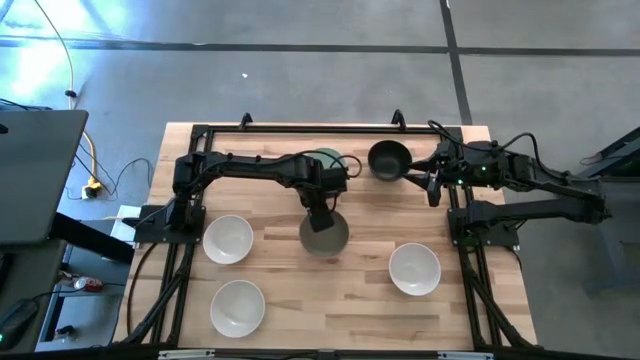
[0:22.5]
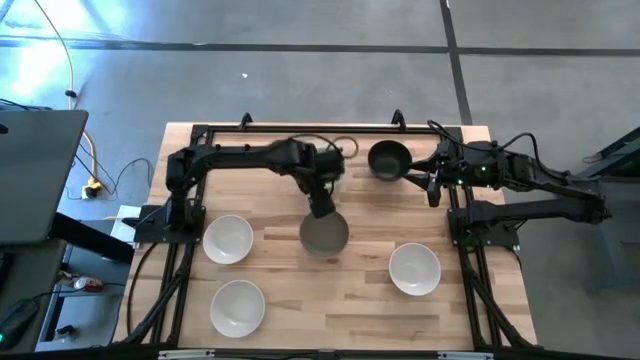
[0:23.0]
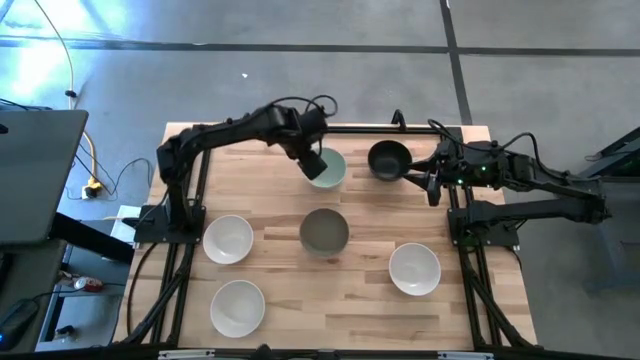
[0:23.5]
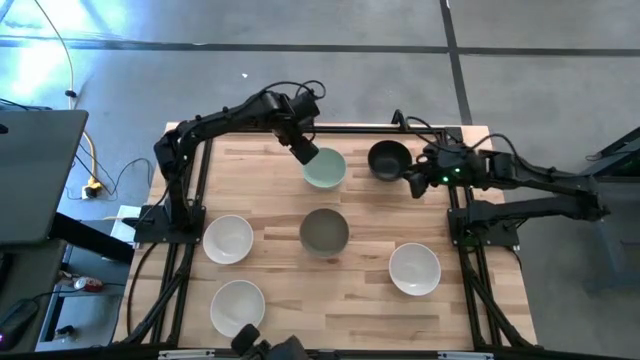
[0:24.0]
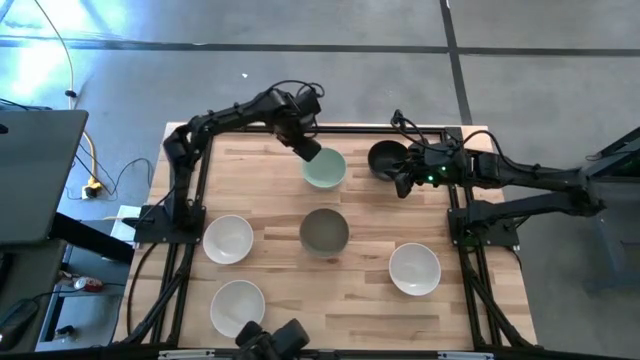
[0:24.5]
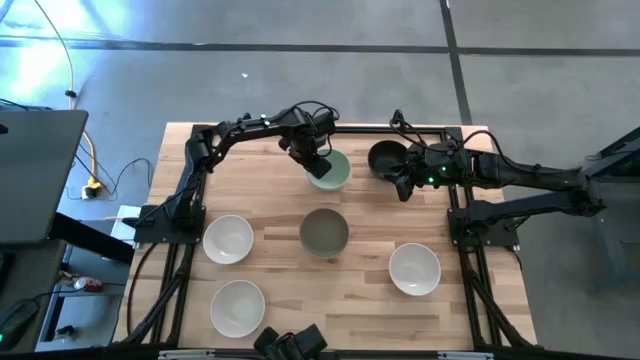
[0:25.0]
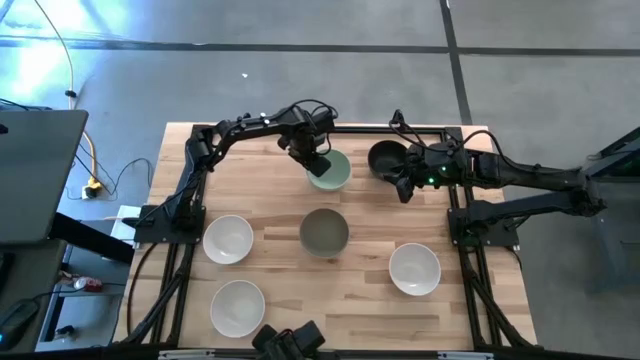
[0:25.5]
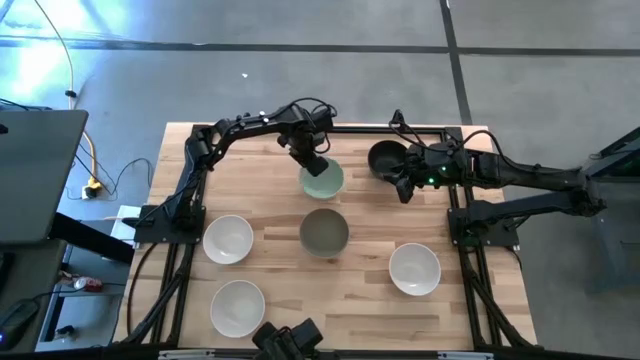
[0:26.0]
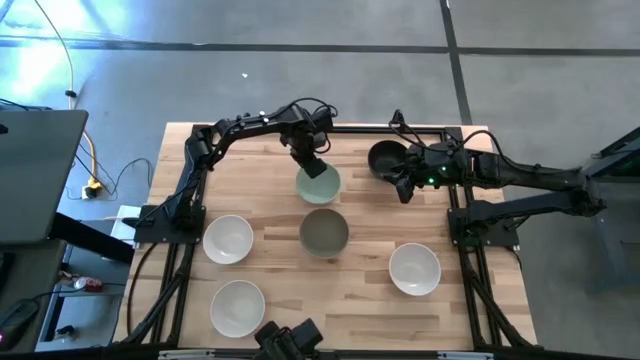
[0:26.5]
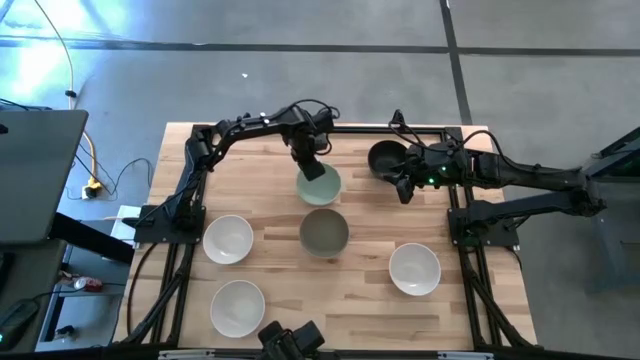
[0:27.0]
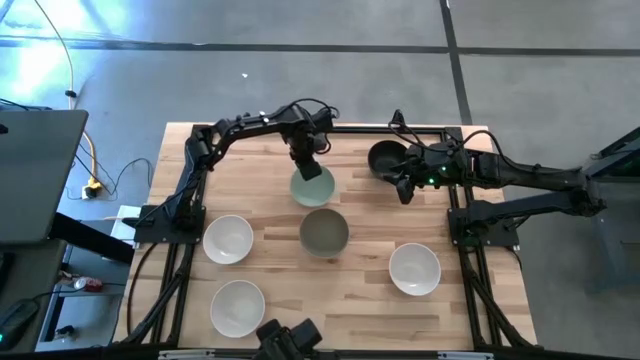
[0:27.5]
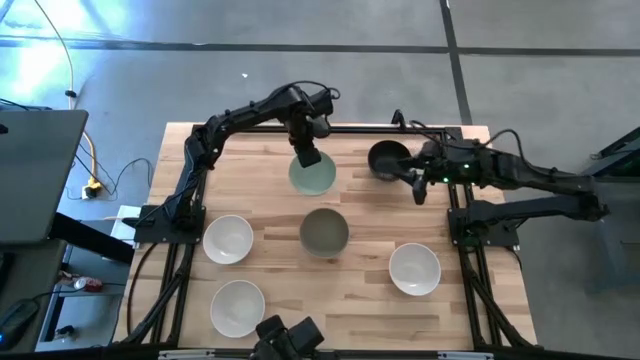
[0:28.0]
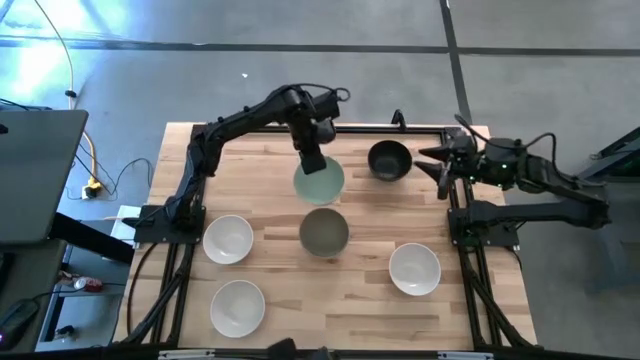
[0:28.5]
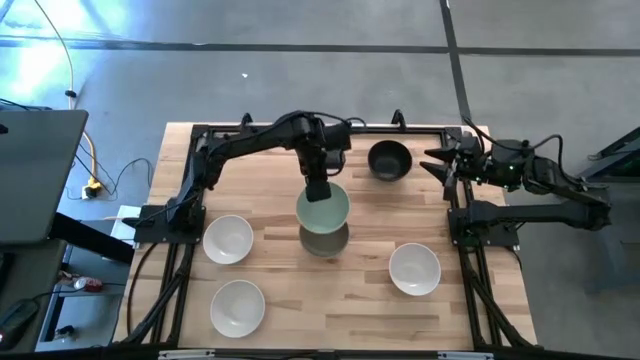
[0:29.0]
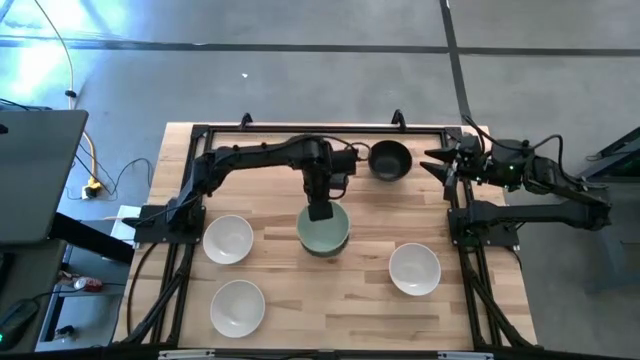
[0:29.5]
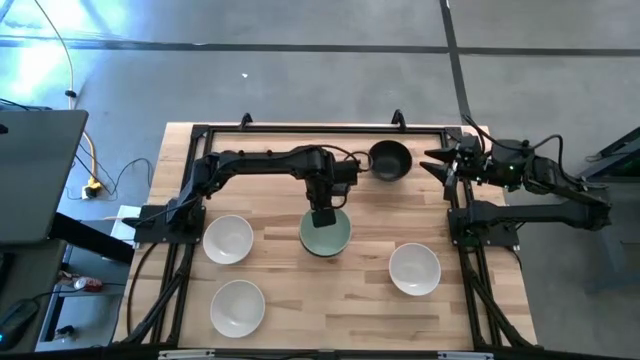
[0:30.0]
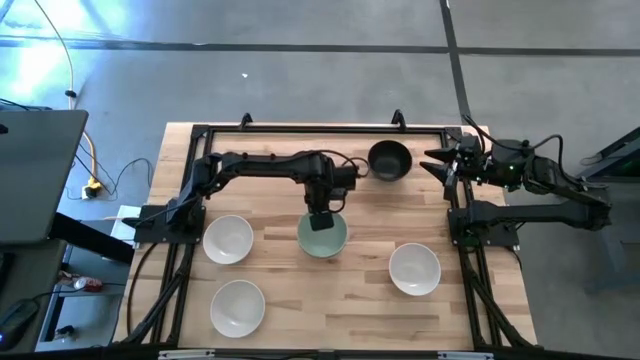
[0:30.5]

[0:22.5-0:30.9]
Task: Nest bowls inside each other
Stack the light blue bowl on top of the grey bowl

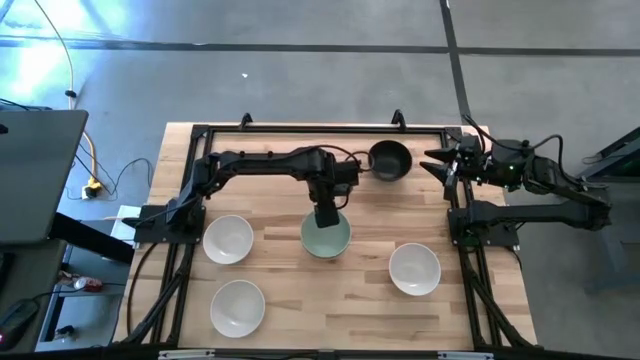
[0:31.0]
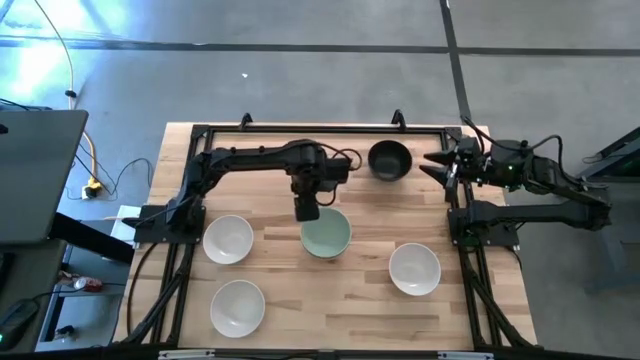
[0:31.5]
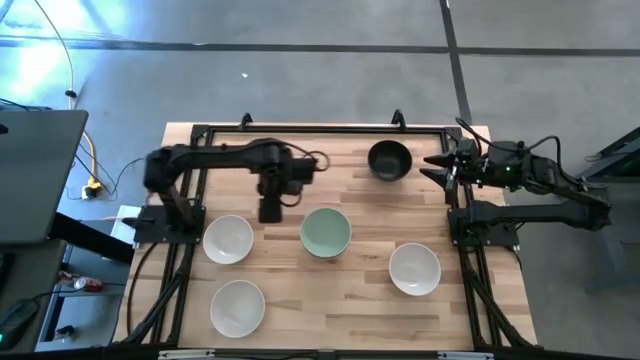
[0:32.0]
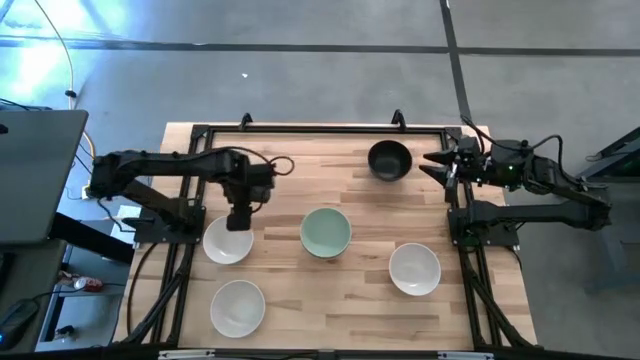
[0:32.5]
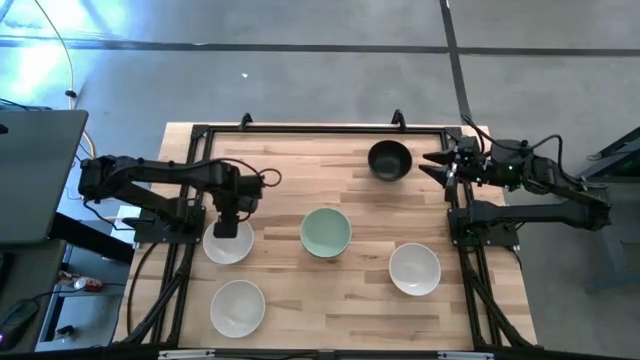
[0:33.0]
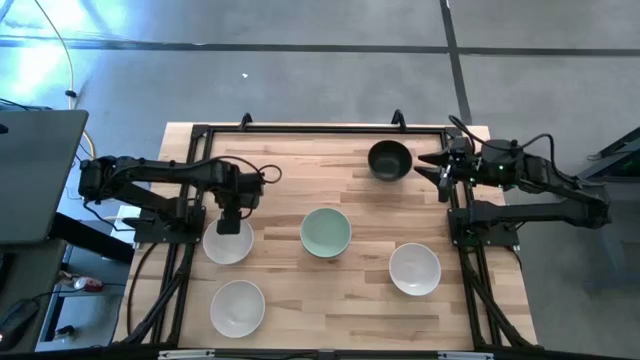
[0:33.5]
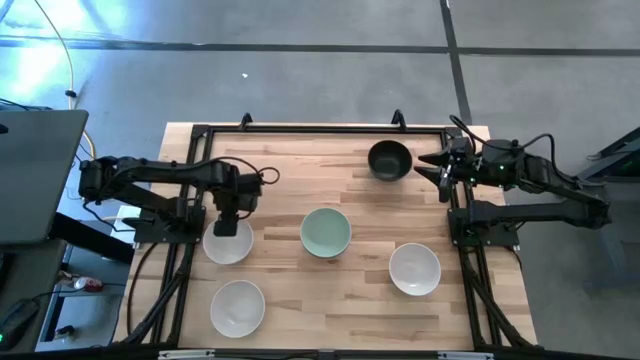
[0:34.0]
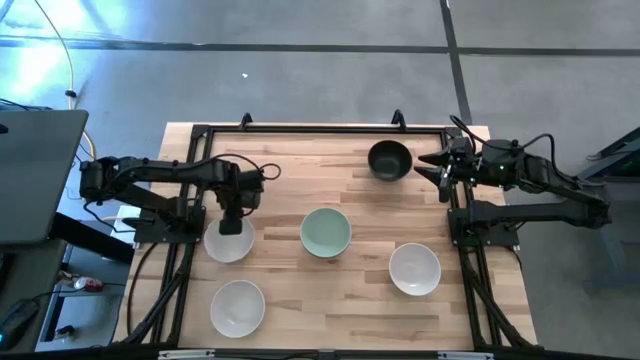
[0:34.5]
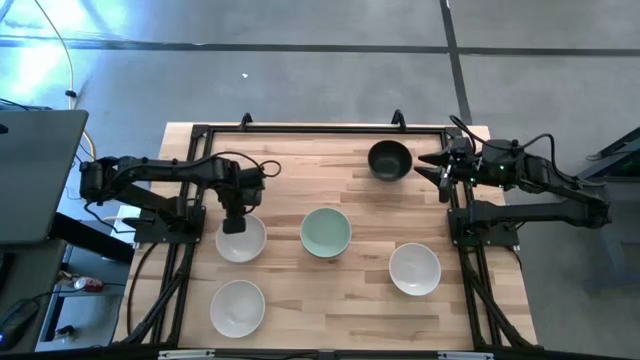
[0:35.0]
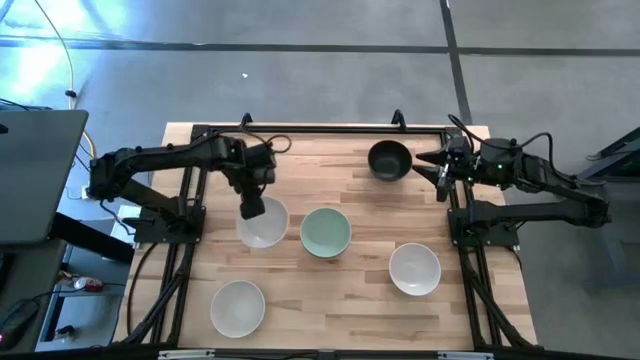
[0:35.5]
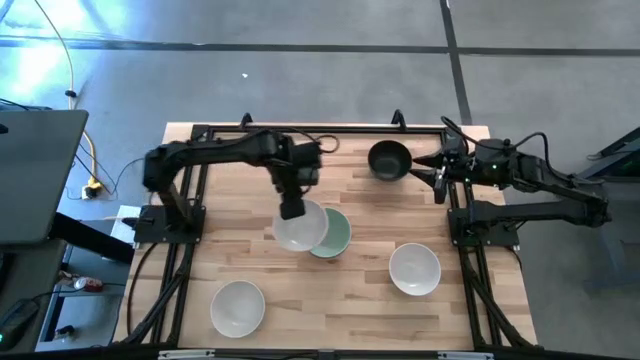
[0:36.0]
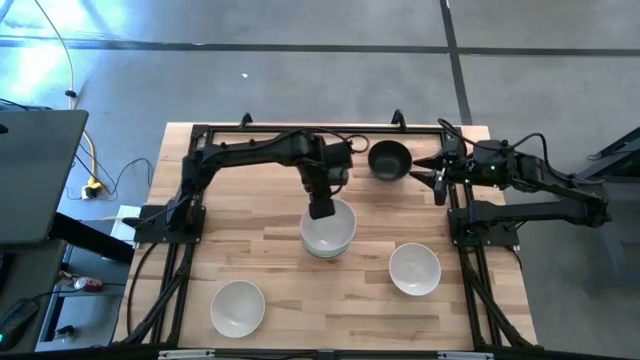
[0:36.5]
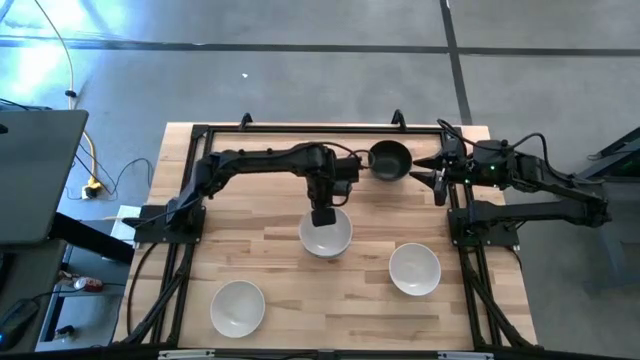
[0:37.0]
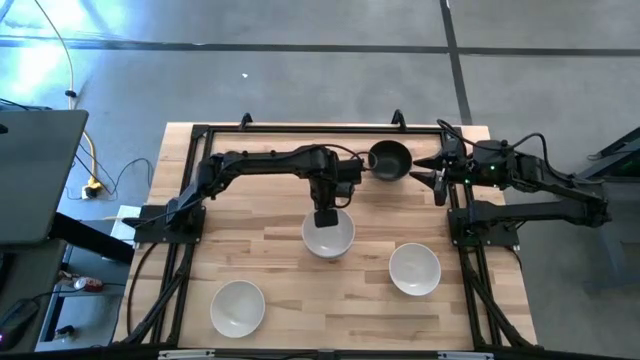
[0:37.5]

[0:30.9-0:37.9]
Stack the top left white bowl on top the light blue bowl

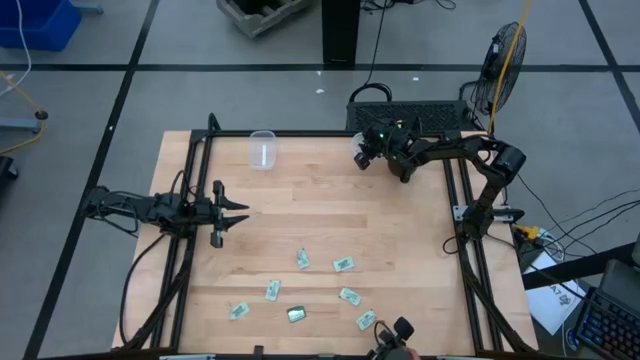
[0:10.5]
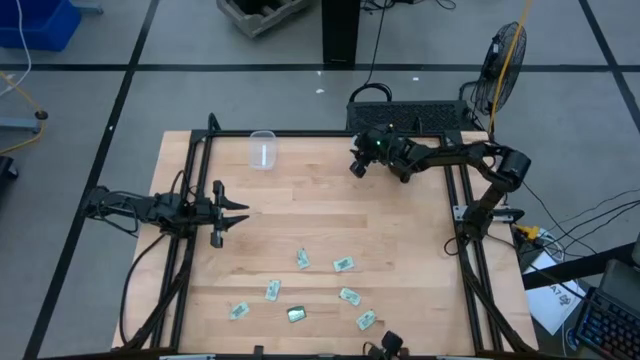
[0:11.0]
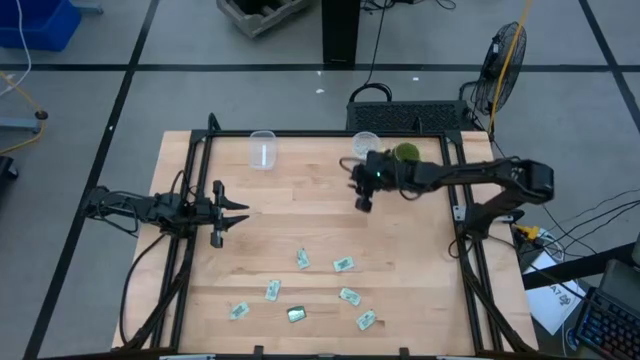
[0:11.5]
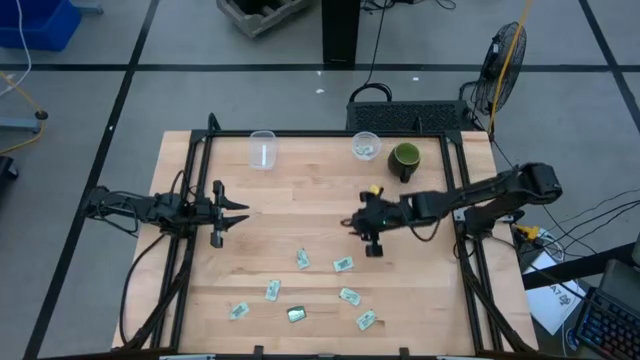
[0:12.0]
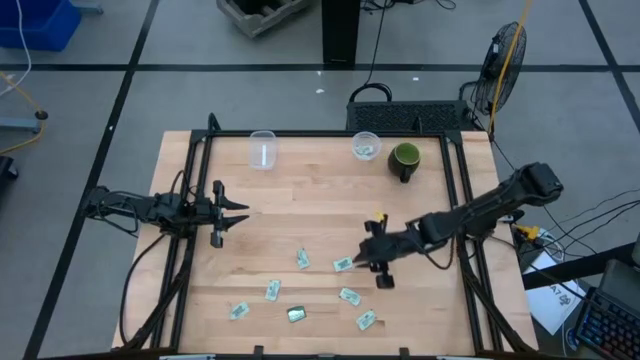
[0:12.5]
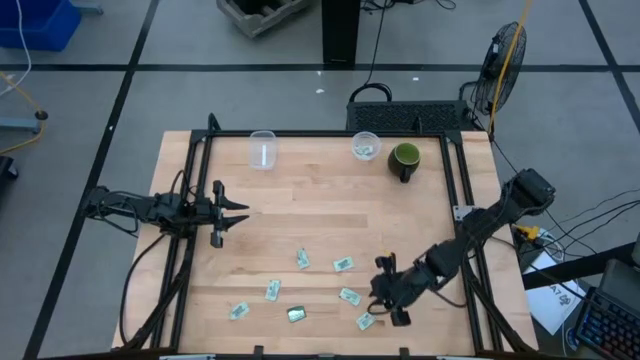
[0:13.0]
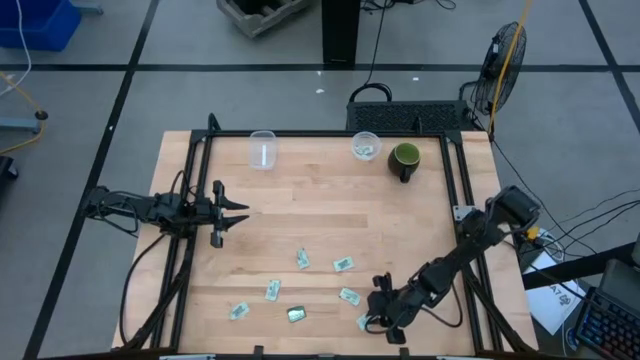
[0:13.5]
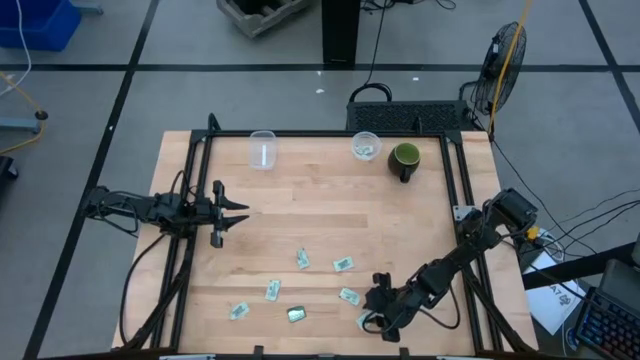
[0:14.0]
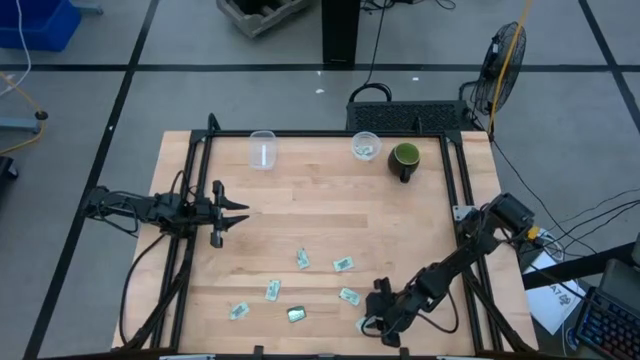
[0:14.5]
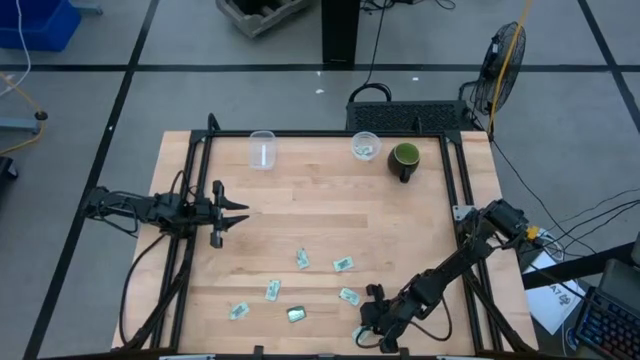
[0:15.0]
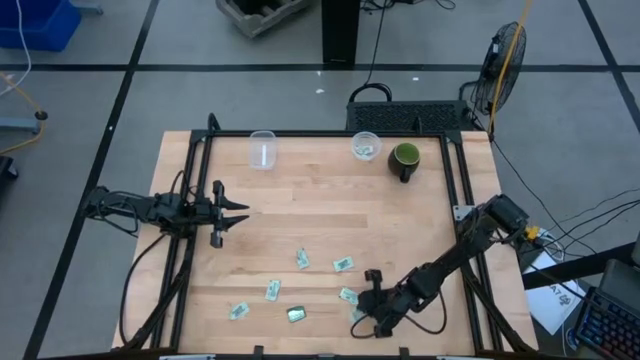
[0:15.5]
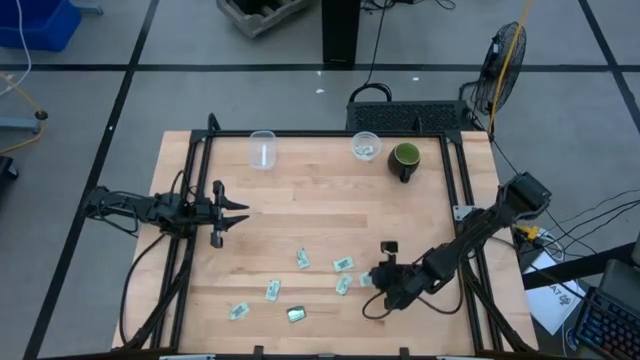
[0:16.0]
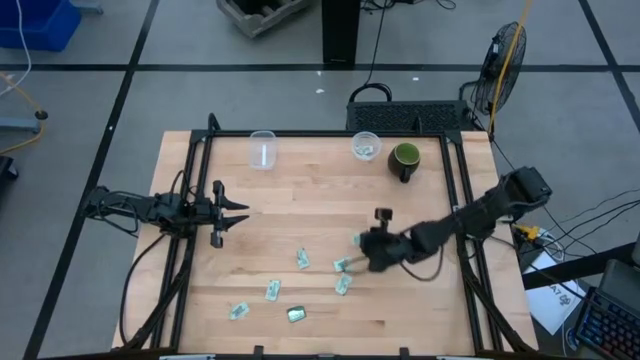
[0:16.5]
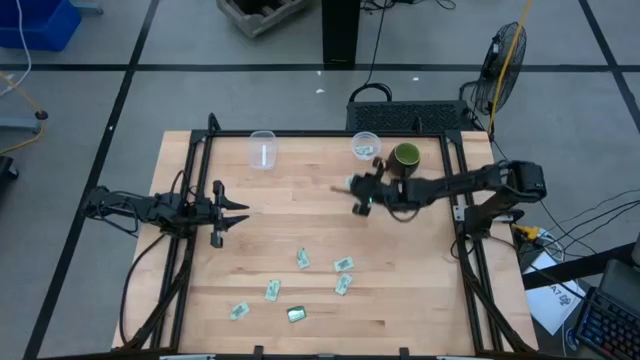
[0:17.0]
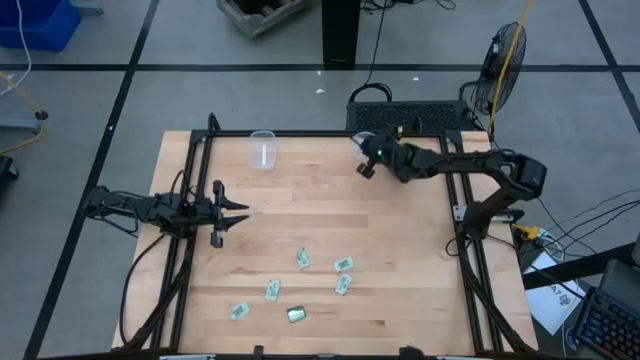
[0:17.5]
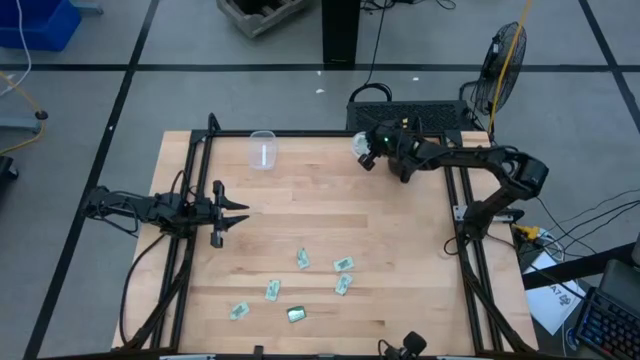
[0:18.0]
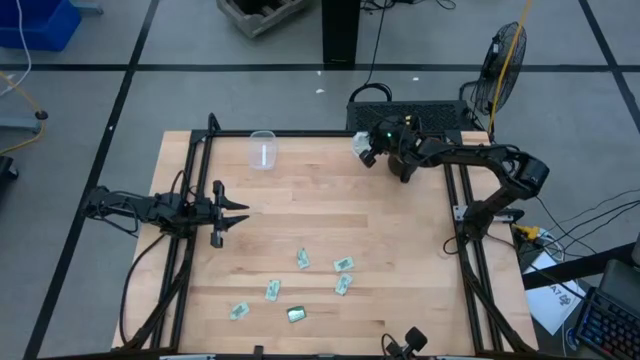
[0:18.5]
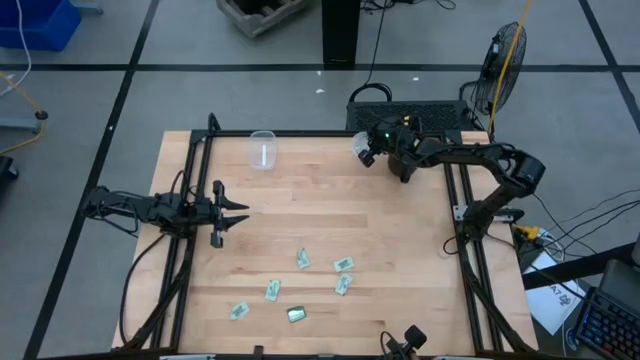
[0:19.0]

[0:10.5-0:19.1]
Task: Pick and place items into bin
Put the green stevia packet into the right transparent bin
